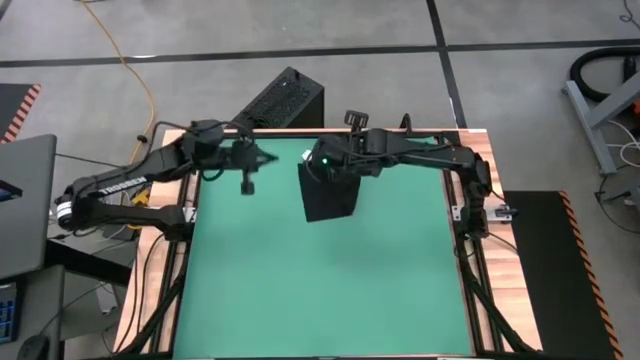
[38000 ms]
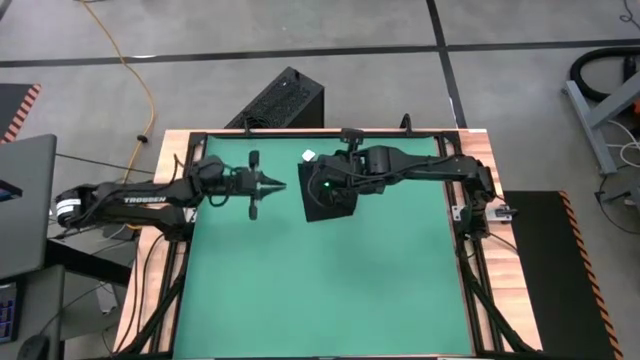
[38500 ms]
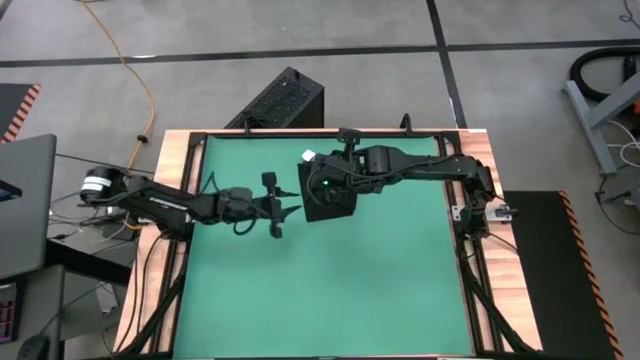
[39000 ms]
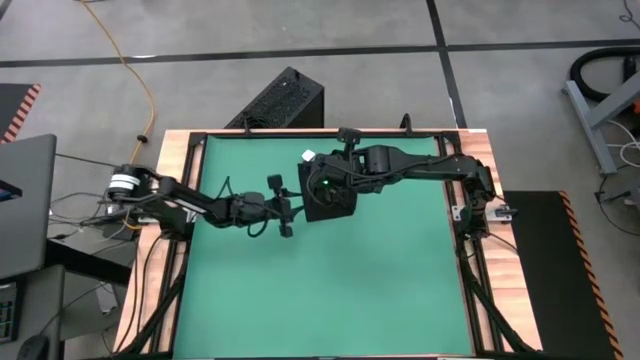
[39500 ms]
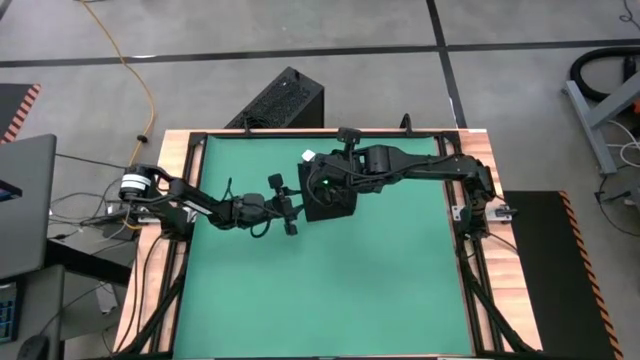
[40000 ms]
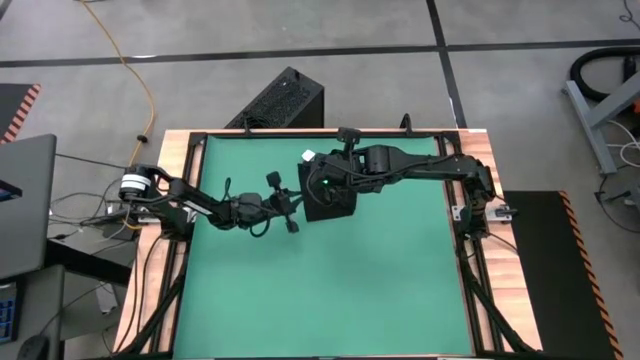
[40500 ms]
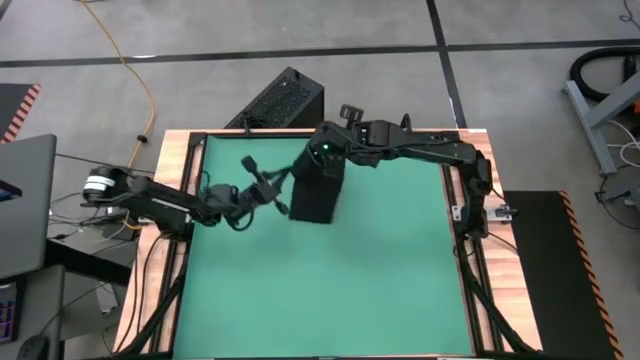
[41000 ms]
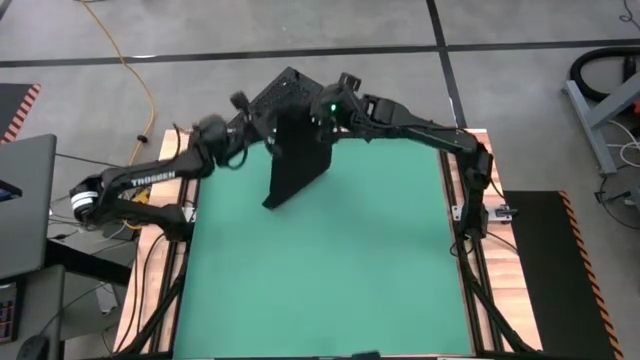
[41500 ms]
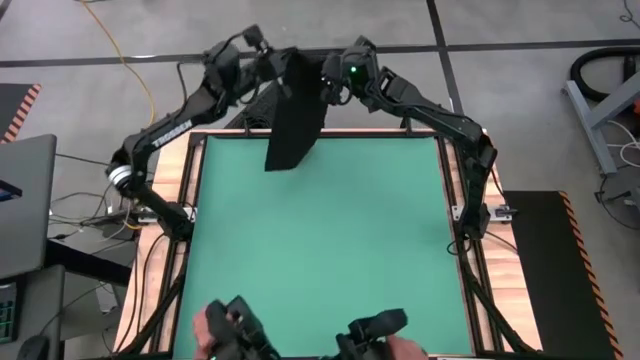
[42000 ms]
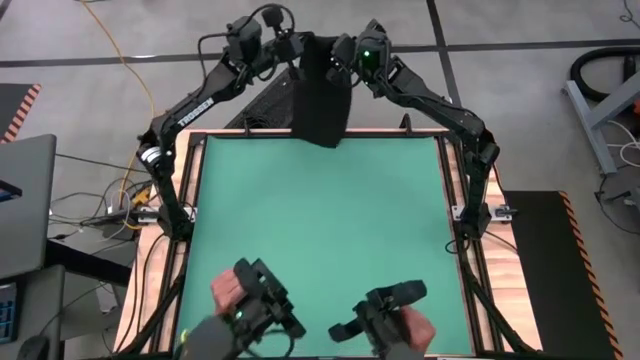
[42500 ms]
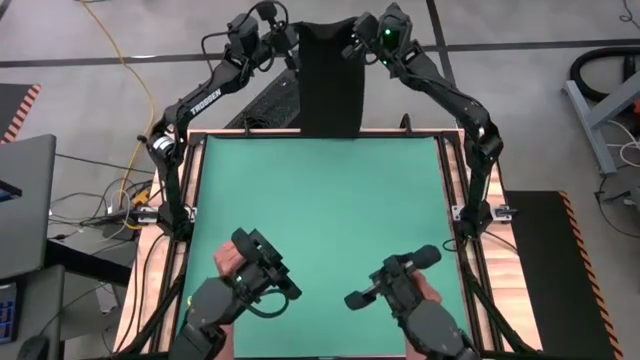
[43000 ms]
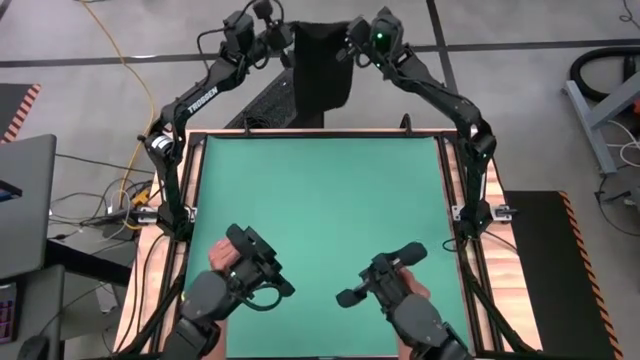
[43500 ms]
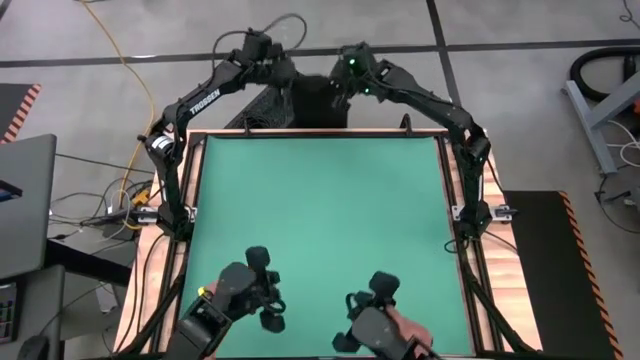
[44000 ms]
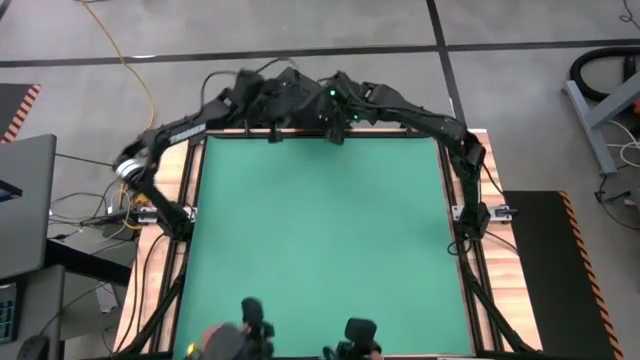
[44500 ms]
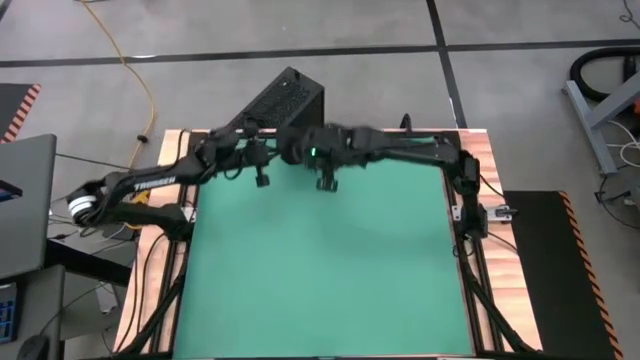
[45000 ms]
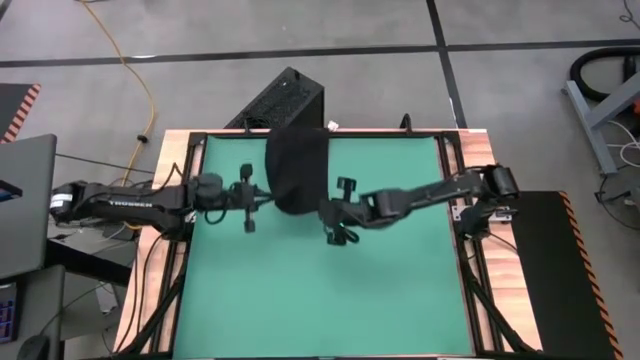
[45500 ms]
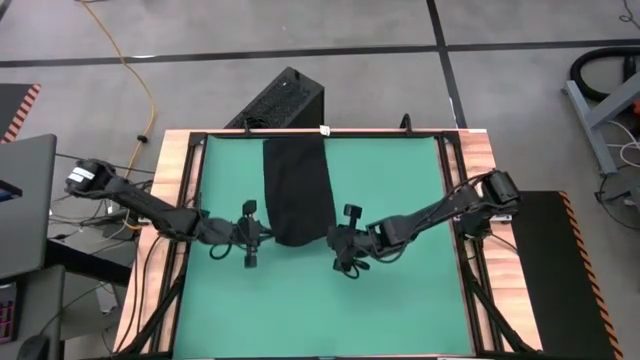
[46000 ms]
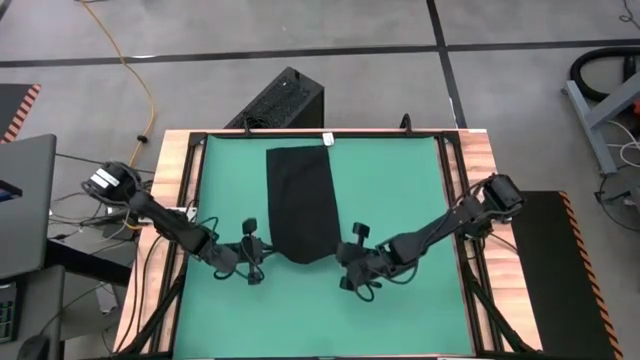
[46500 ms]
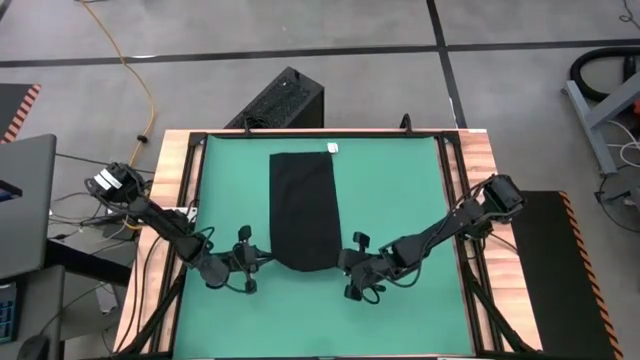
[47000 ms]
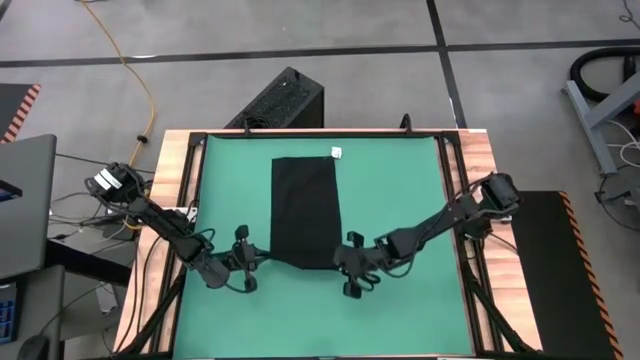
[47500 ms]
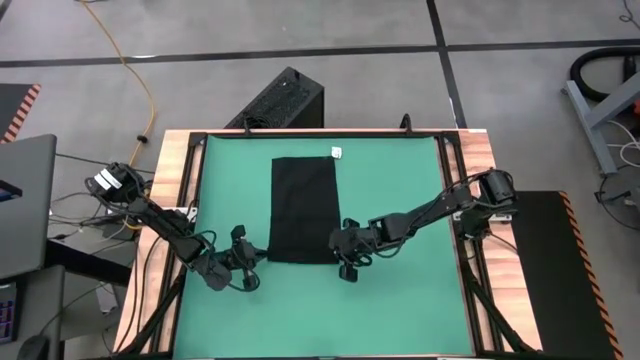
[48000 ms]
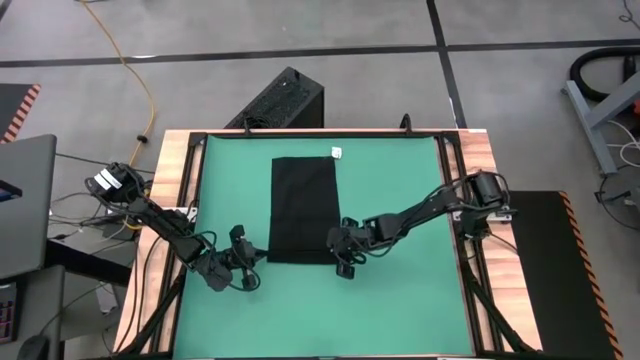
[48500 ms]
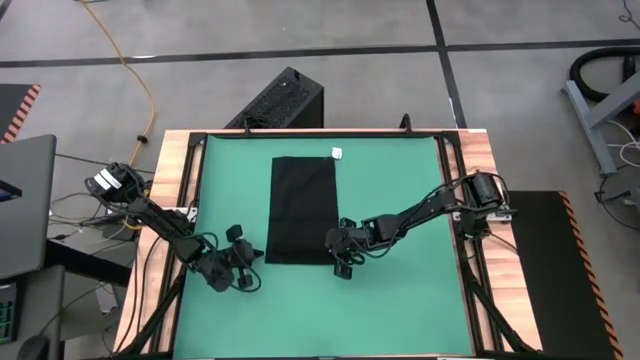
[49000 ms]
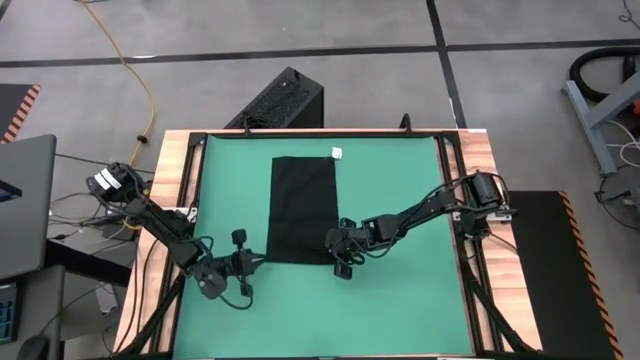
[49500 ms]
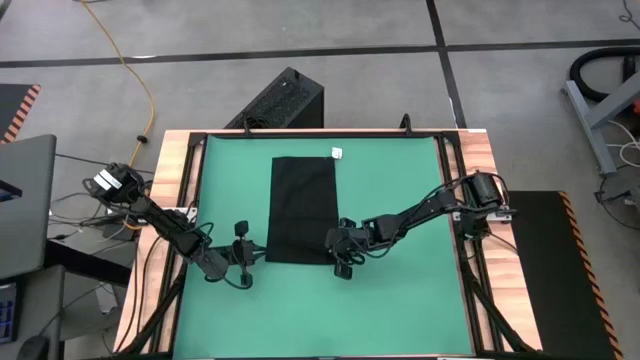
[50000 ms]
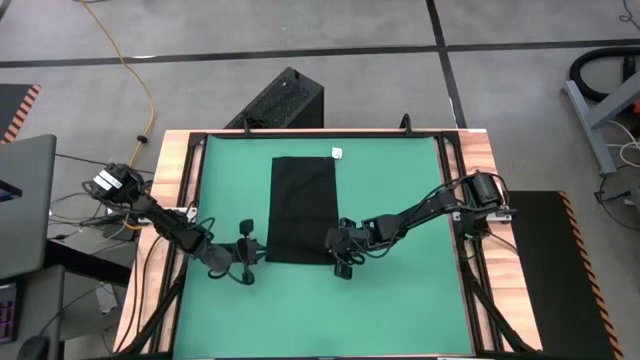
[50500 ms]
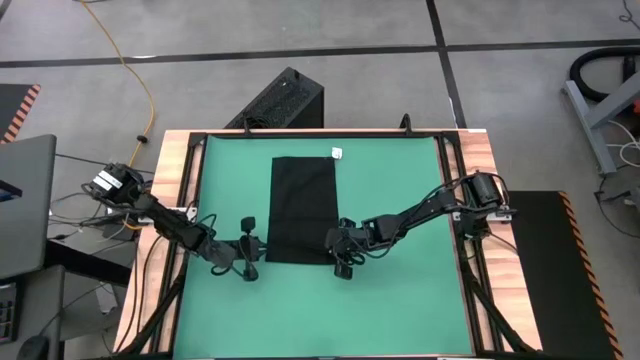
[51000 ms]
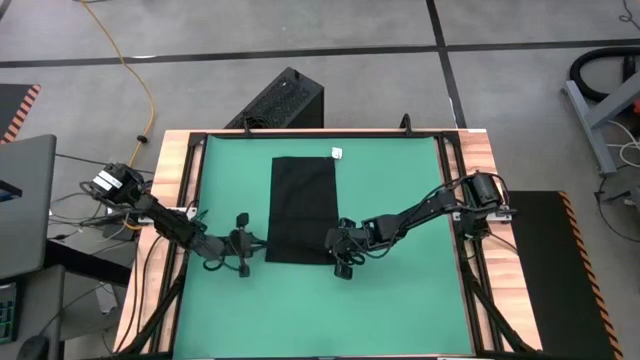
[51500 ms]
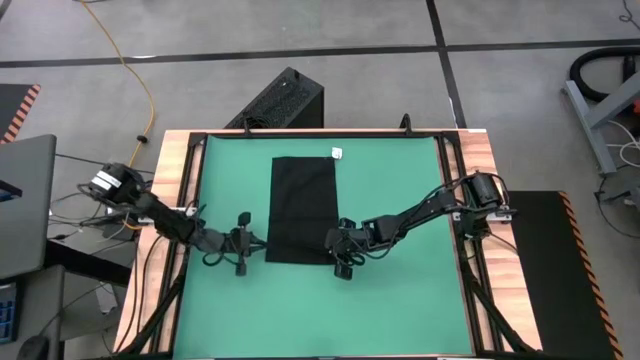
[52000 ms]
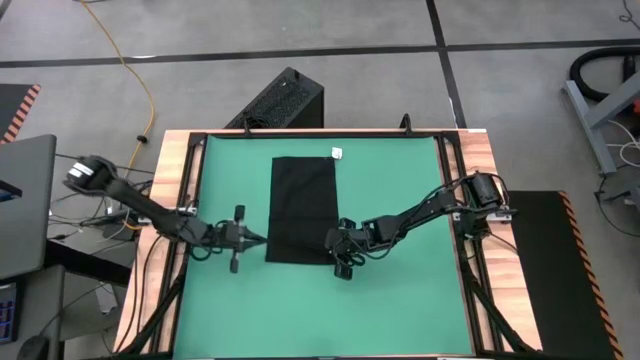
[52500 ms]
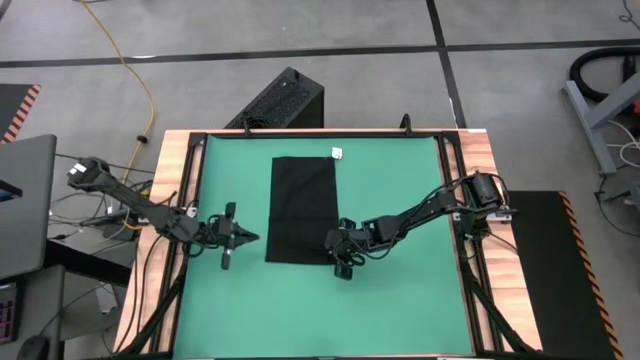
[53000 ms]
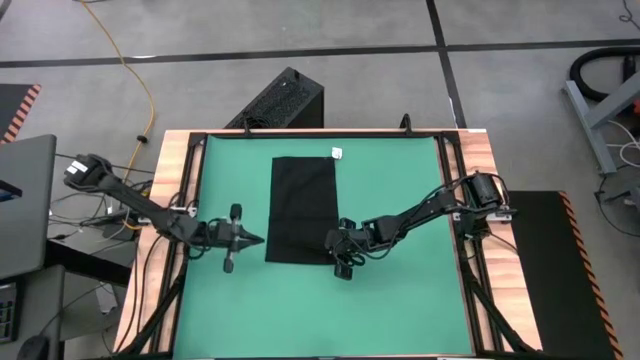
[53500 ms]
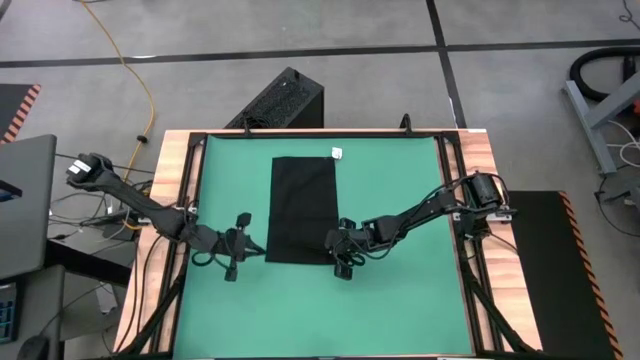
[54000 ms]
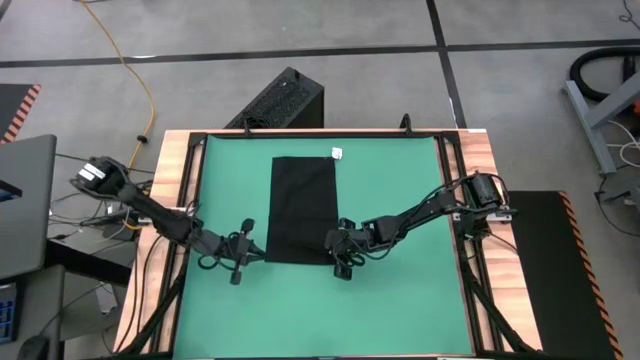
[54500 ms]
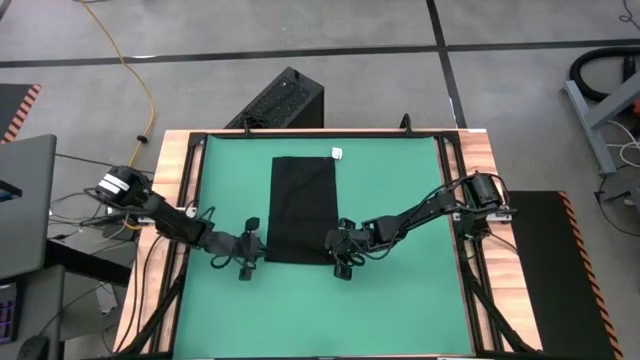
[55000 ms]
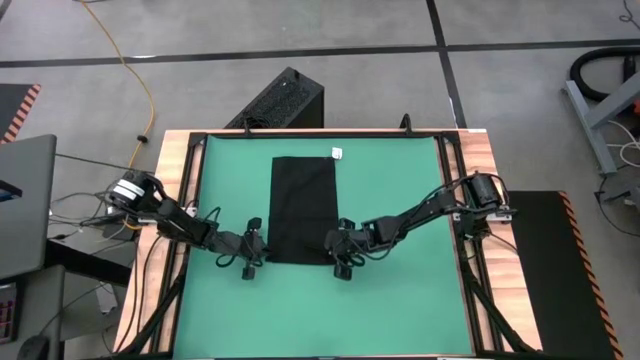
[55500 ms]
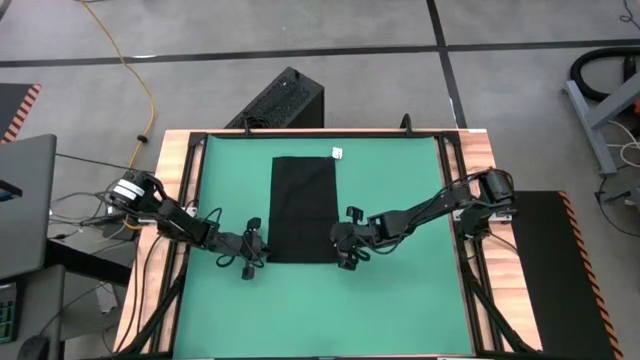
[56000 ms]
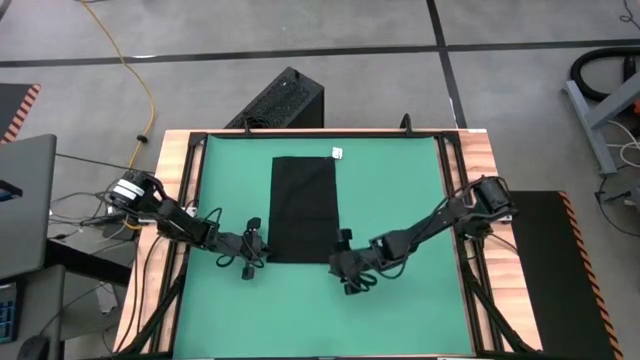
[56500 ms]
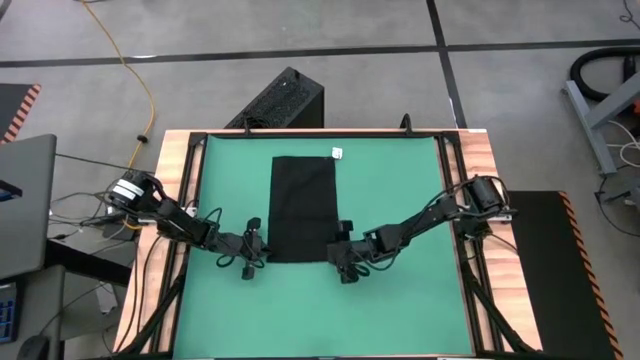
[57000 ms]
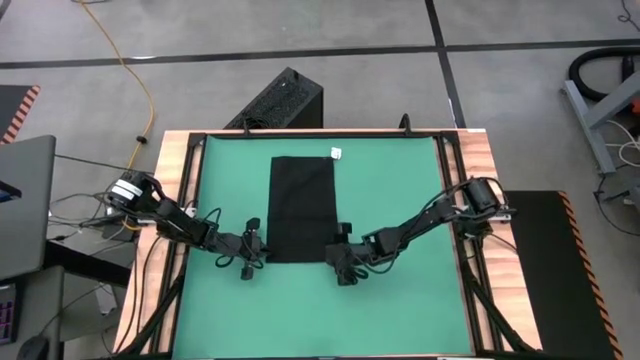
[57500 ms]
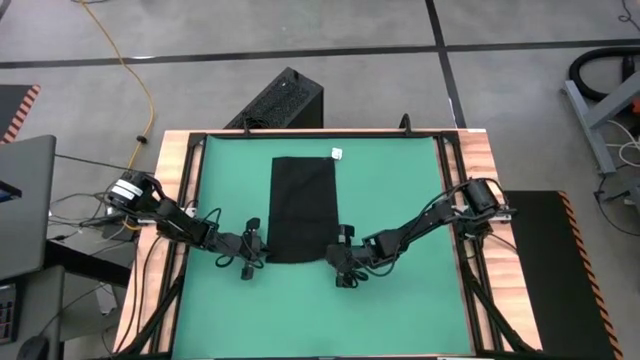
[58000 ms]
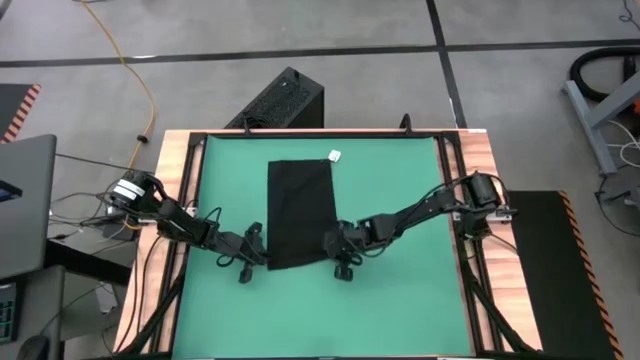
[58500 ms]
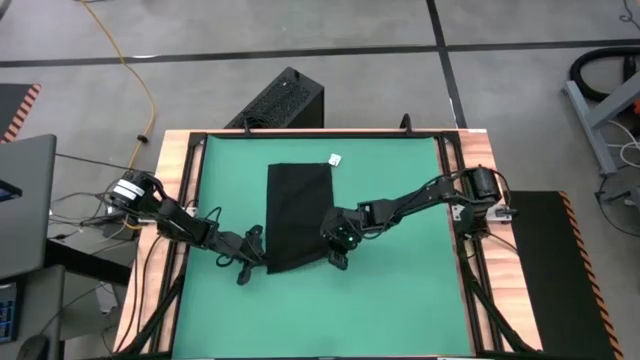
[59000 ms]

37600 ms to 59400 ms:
Task: Roll towel
Roll the black towel
